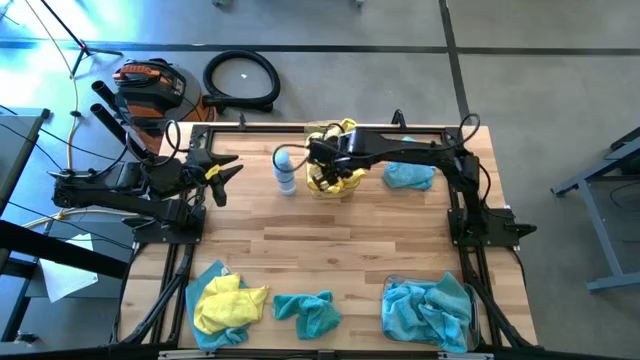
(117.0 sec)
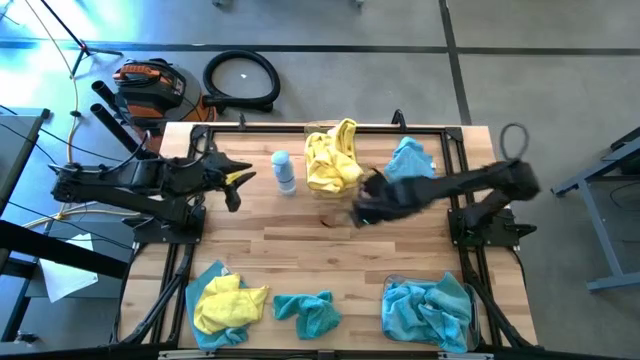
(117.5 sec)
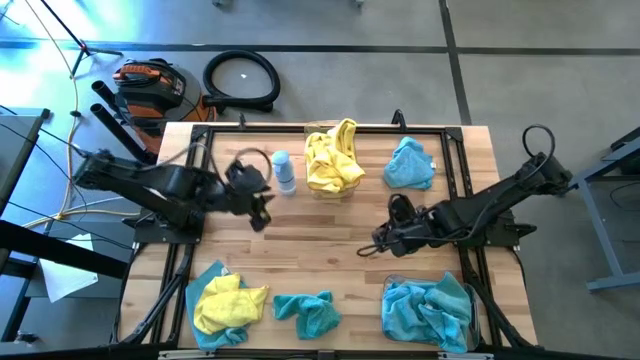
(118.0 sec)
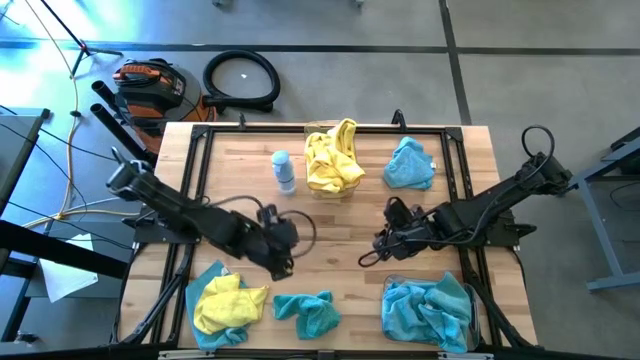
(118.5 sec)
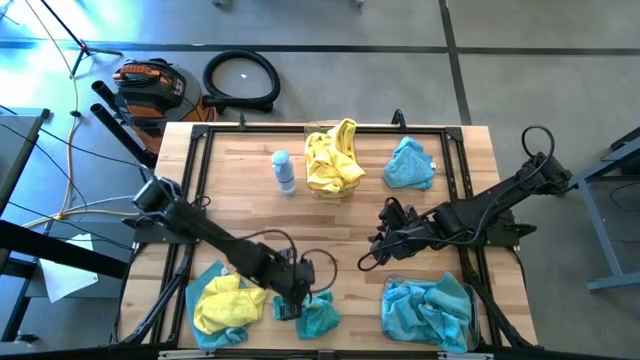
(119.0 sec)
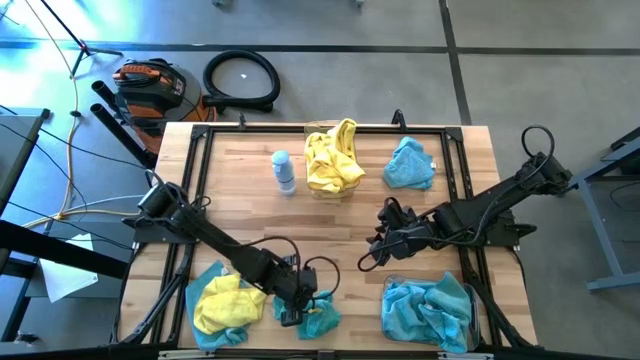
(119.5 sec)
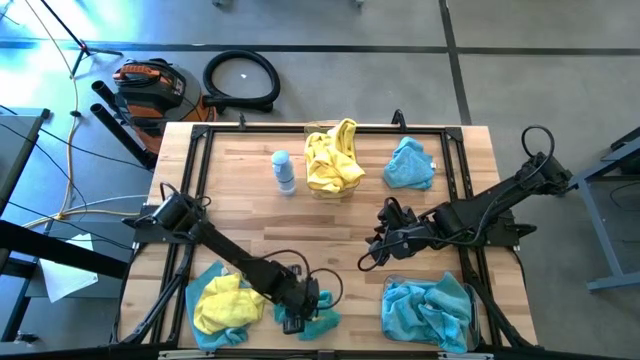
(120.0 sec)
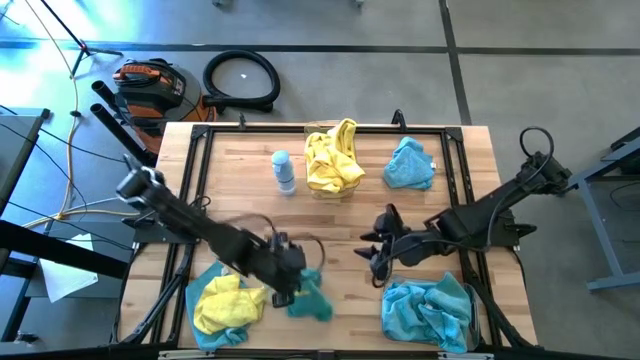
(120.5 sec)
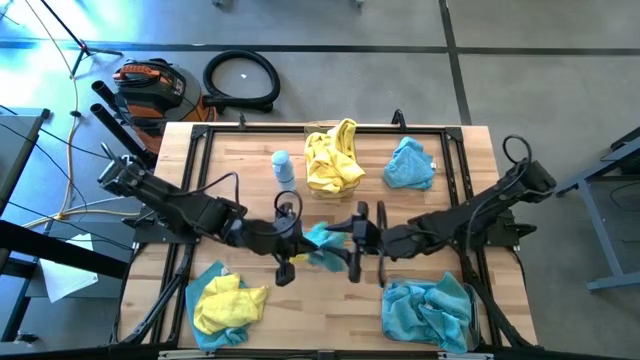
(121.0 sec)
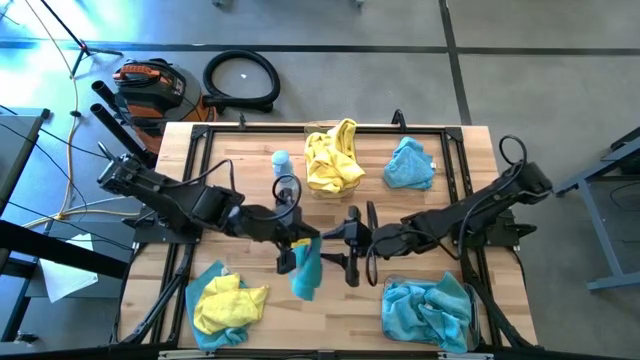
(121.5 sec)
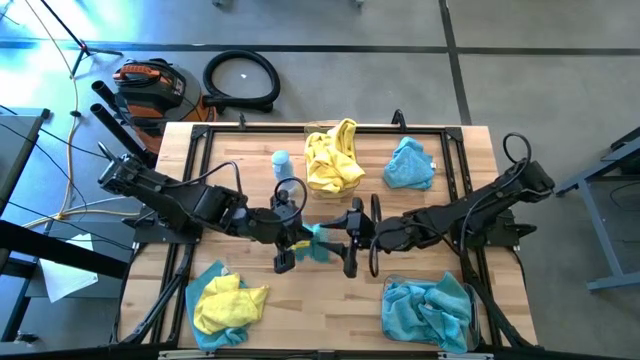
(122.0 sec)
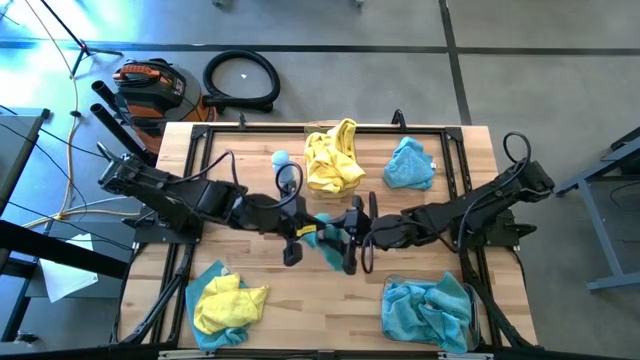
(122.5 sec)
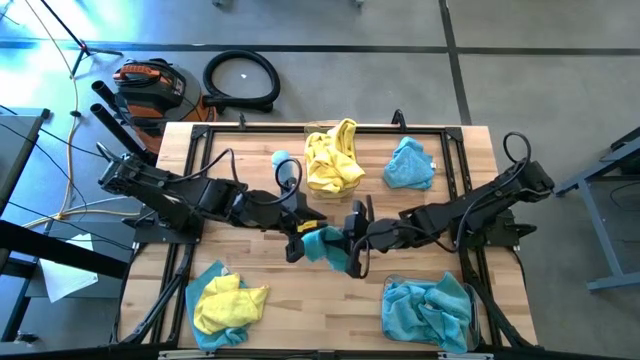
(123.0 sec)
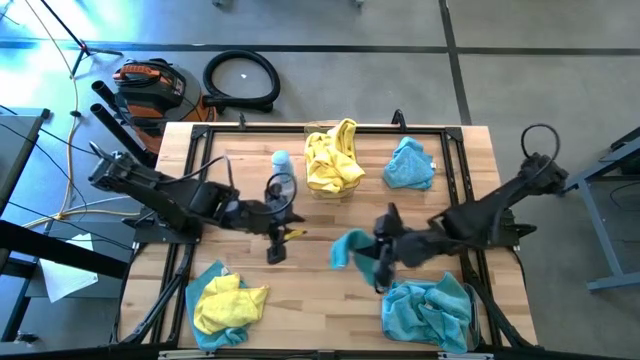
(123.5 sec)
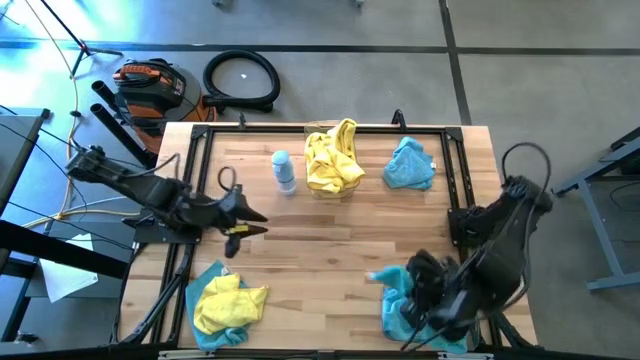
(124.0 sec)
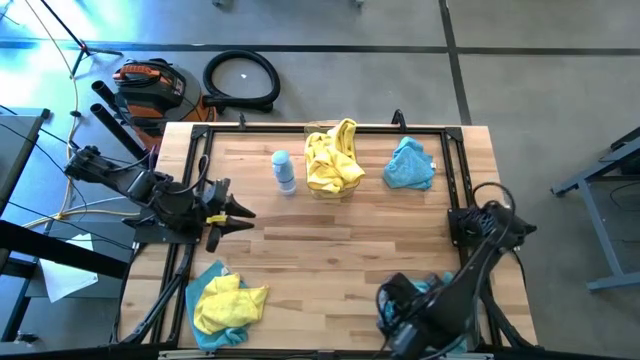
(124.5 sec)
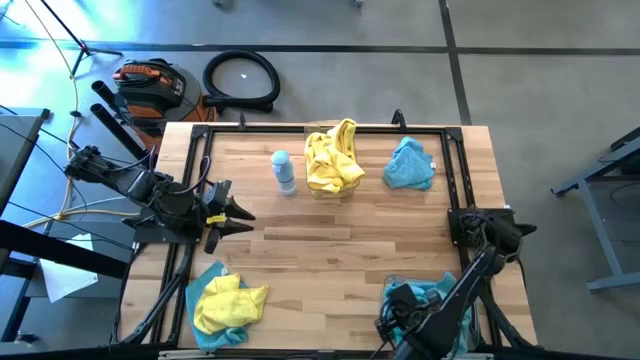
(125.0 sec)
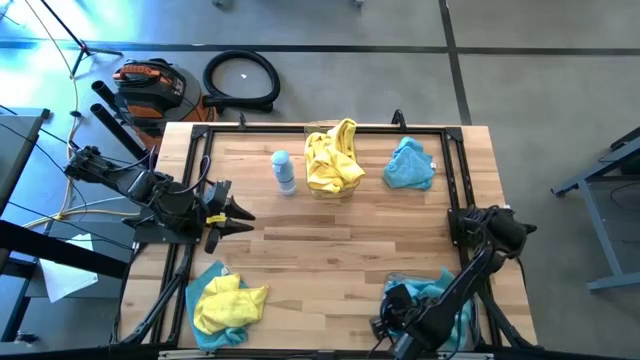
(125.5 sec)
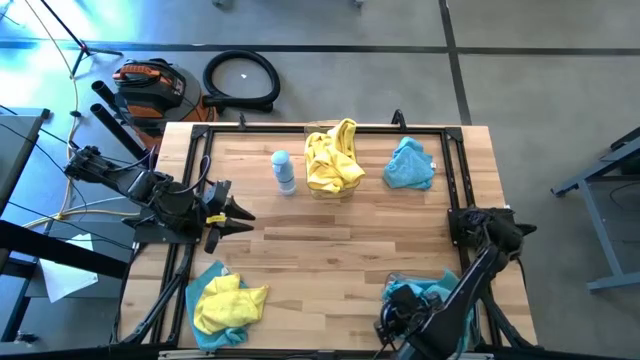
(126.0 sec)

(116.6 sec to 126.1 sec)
Task: Sort microfiber towel by color & place in baskets
Put the blue towel into the bottom transparent bin

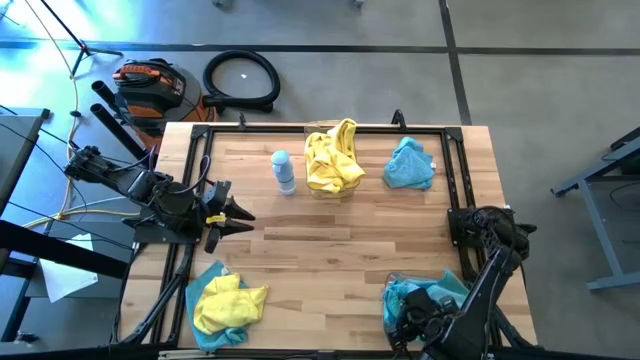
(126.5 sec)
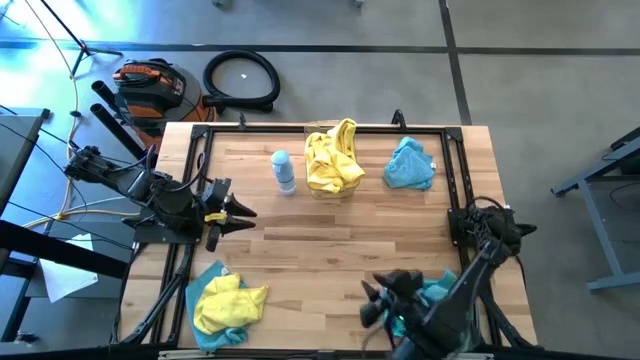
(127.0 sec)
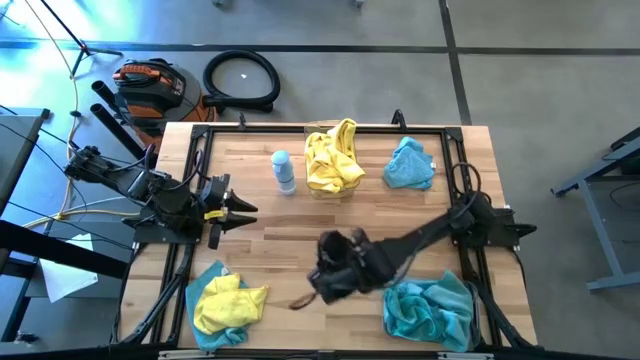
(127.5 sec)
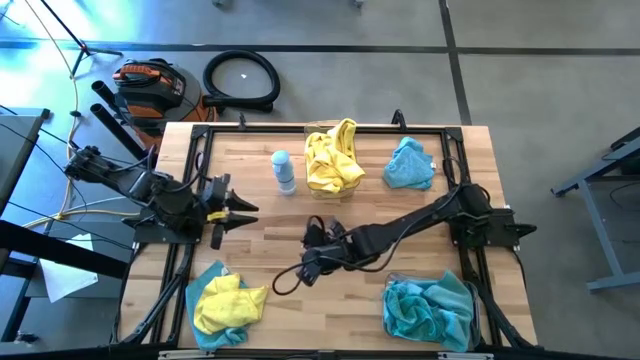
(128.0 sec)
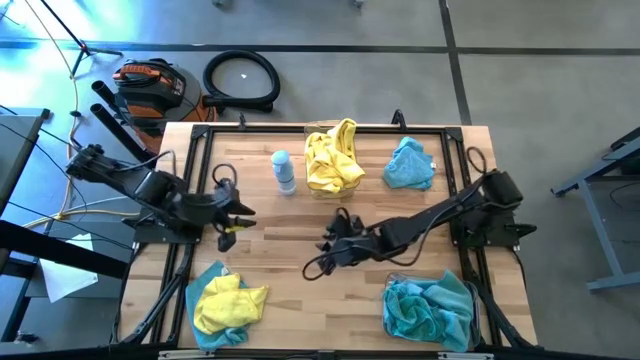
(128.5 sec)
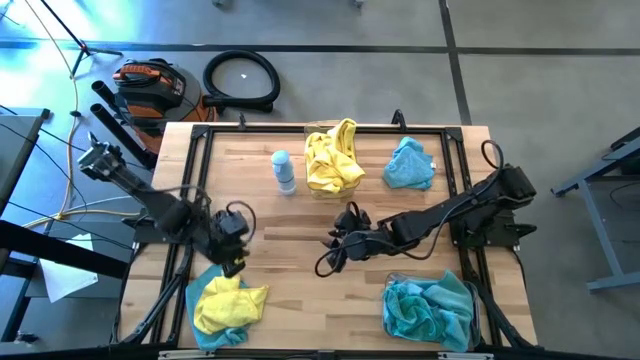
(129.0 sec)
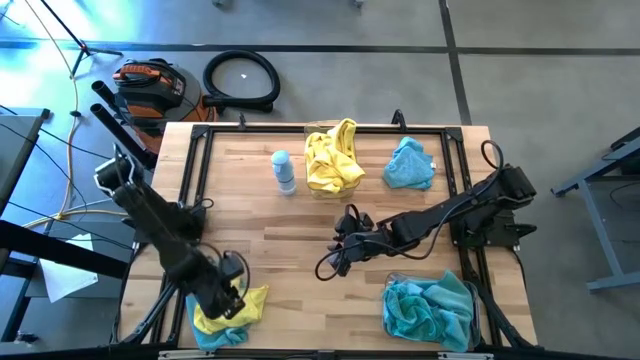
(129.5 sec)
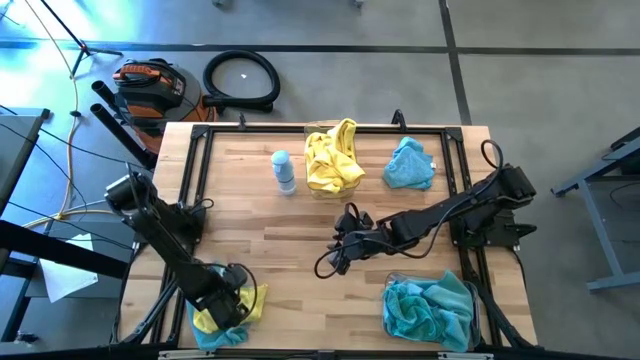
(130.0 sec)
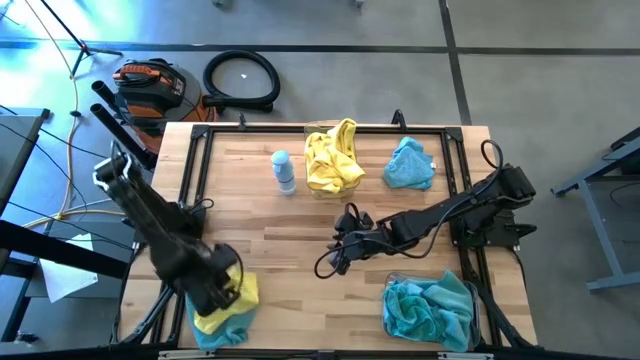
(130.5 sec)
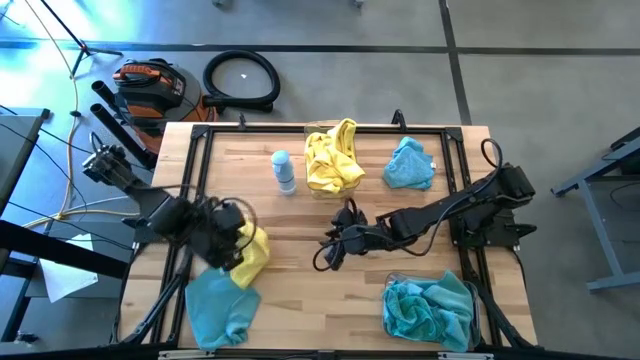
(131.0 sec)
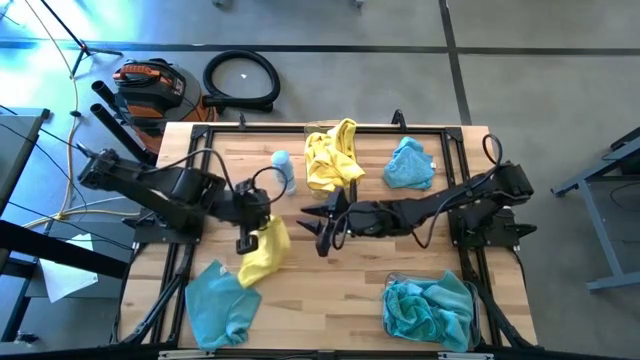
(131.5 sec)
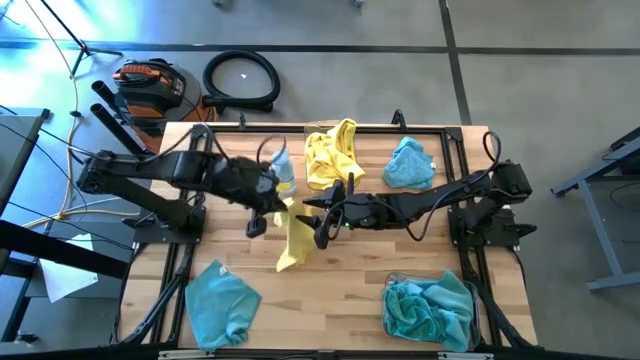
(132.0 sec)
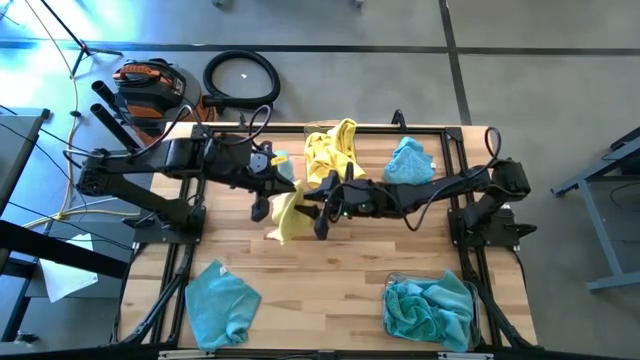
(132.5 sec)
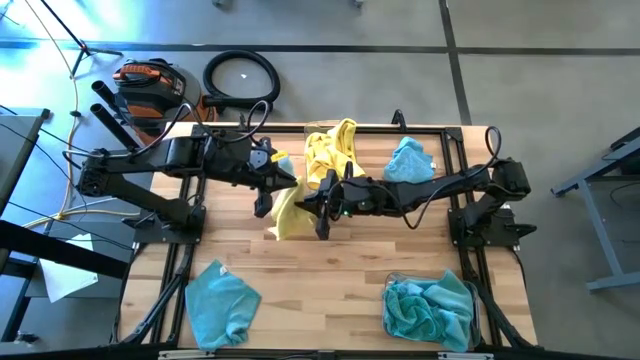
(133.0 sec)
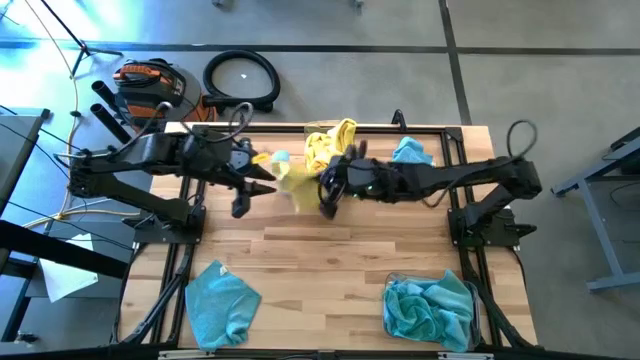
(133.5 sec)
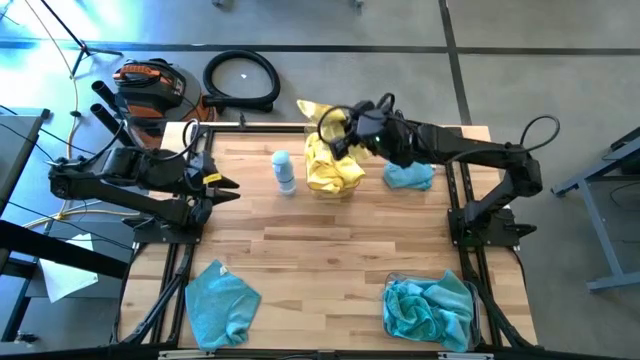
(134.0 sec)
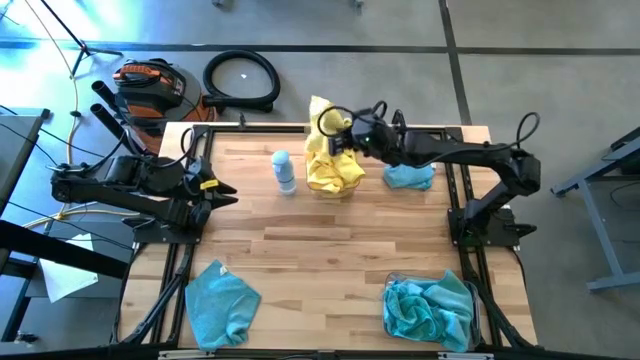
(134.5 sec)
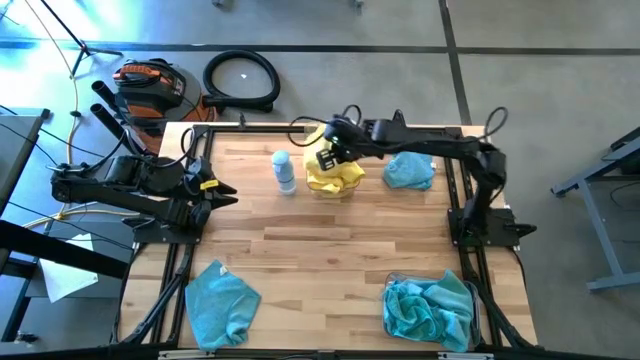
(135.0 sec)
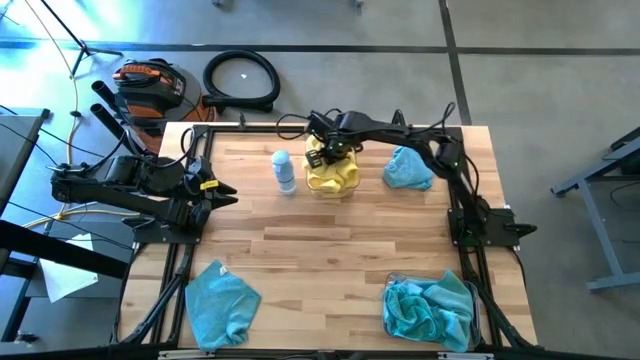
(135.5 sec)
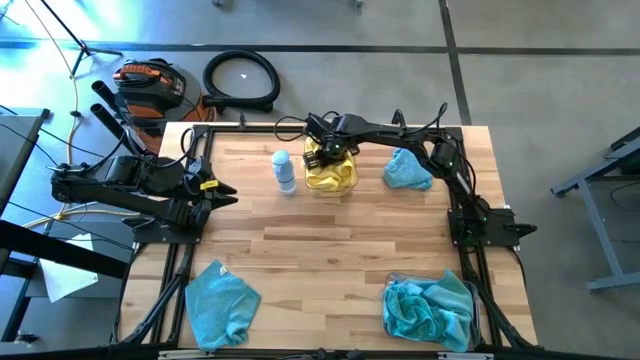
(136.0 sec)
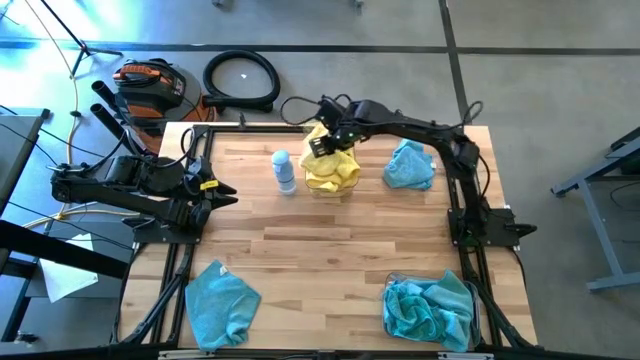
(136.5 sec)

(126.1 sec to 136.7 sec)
Put the yellow towel into the top transparent bin
